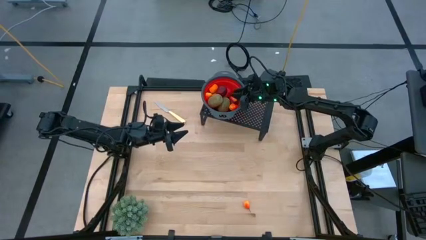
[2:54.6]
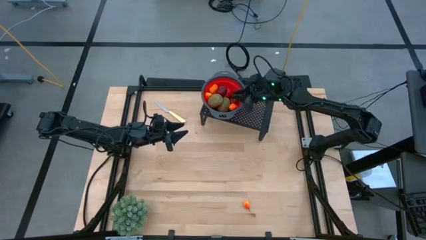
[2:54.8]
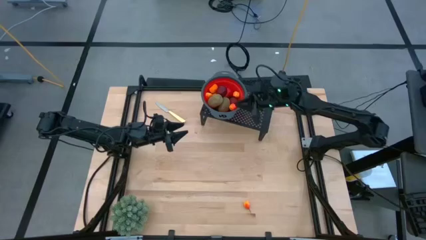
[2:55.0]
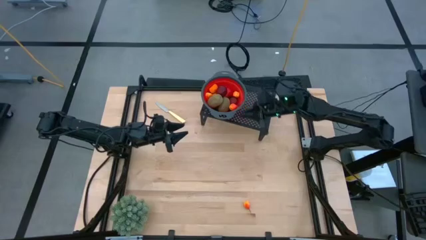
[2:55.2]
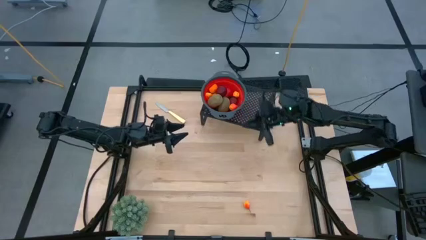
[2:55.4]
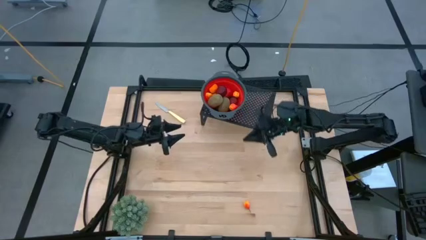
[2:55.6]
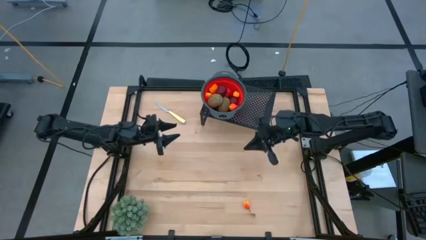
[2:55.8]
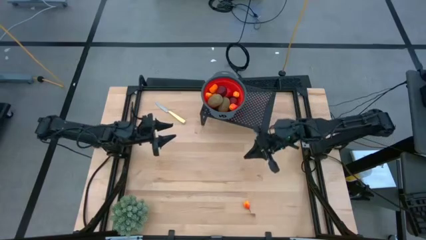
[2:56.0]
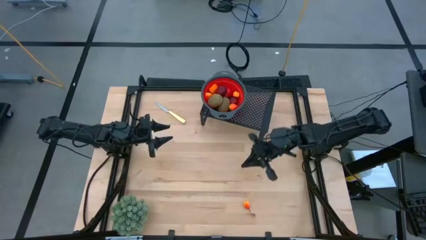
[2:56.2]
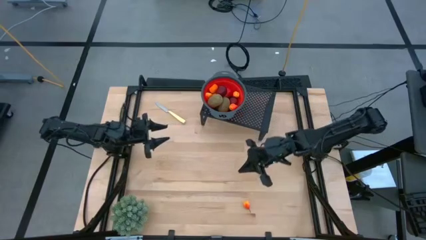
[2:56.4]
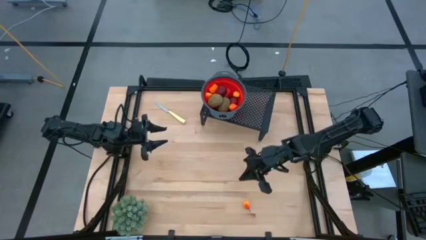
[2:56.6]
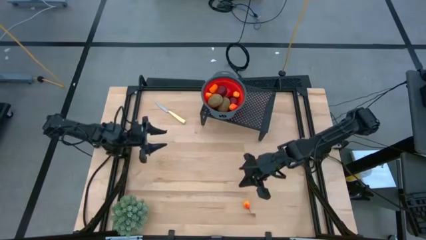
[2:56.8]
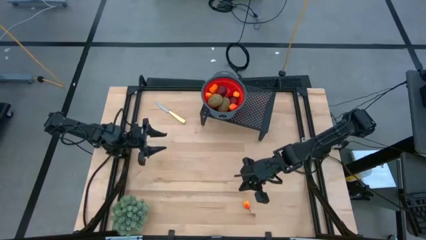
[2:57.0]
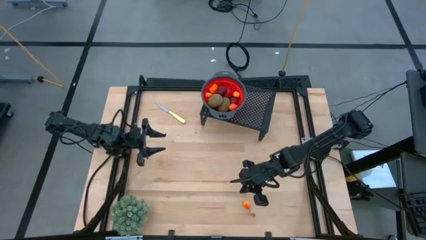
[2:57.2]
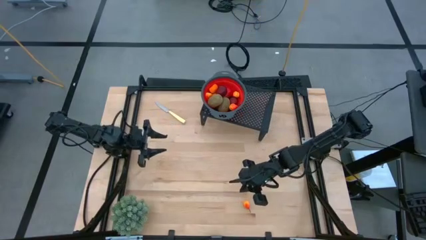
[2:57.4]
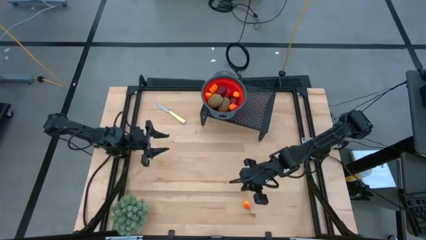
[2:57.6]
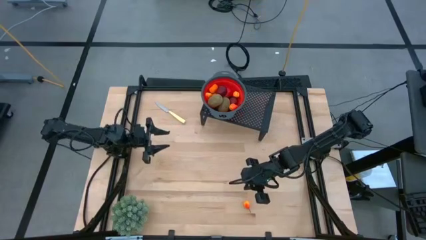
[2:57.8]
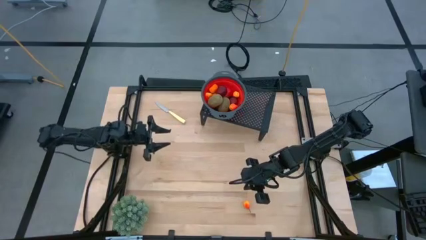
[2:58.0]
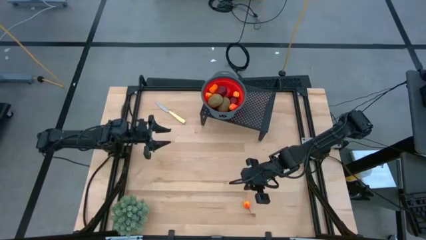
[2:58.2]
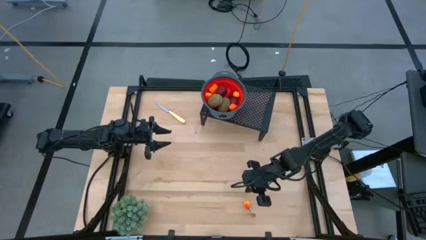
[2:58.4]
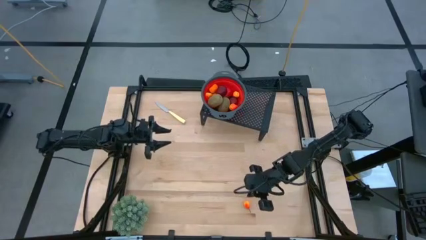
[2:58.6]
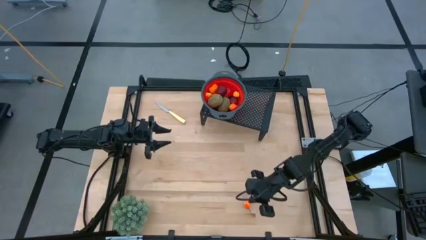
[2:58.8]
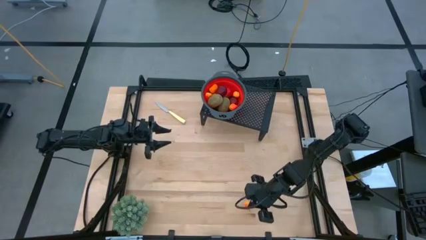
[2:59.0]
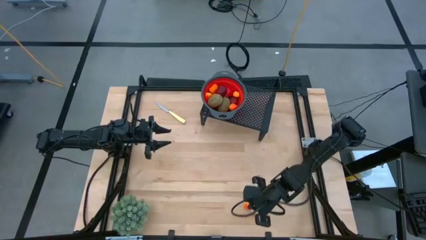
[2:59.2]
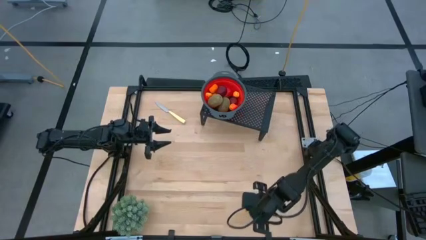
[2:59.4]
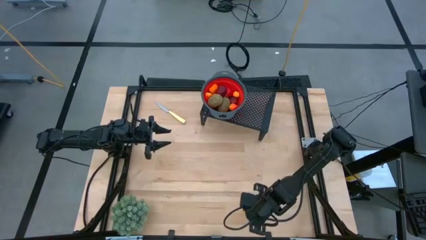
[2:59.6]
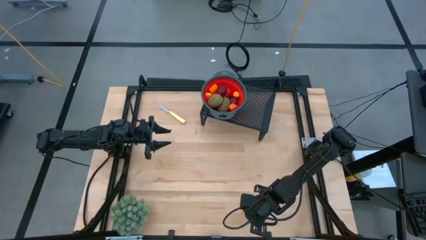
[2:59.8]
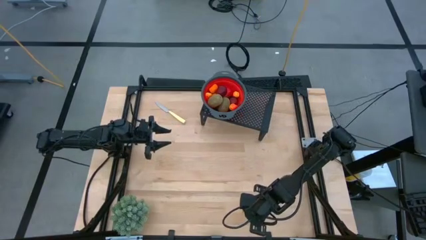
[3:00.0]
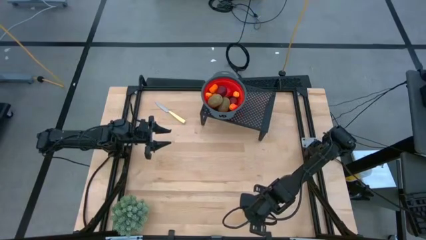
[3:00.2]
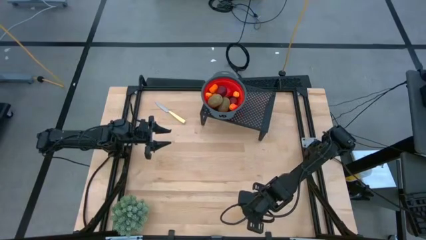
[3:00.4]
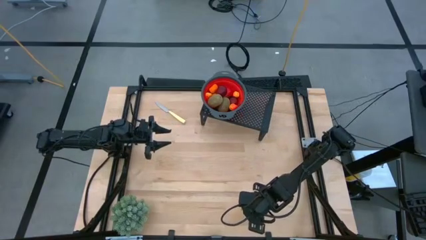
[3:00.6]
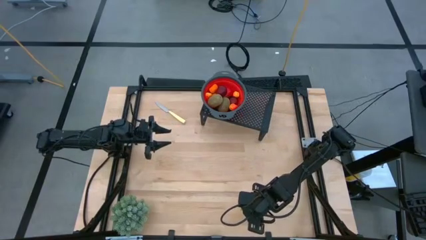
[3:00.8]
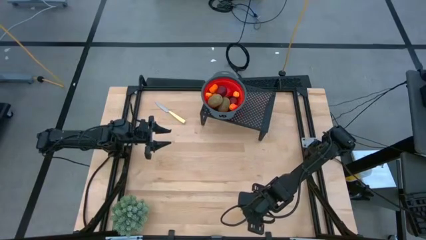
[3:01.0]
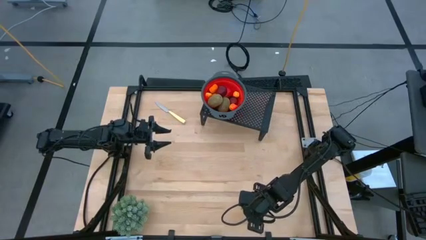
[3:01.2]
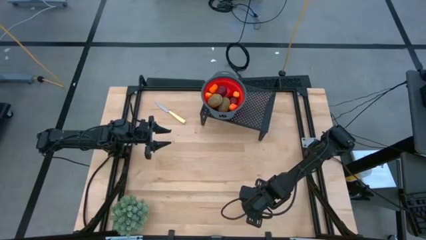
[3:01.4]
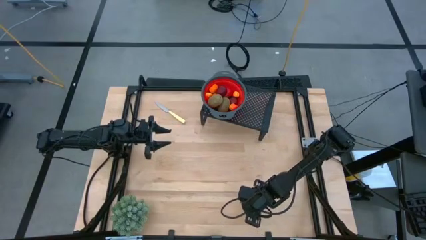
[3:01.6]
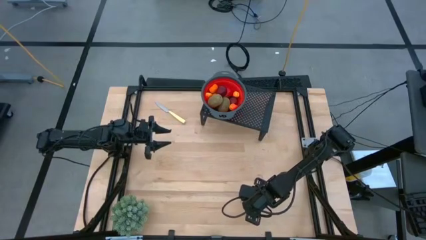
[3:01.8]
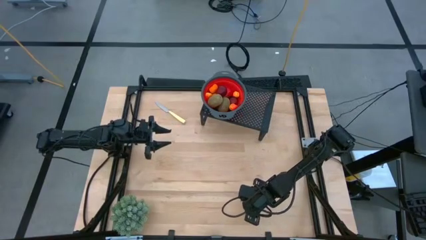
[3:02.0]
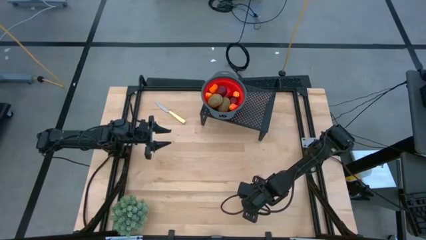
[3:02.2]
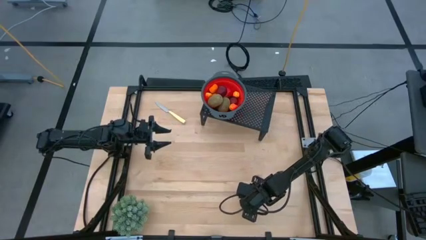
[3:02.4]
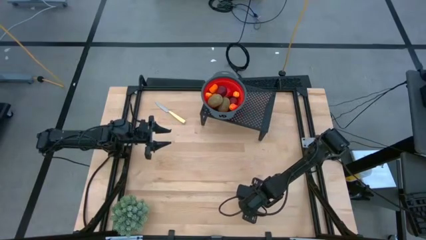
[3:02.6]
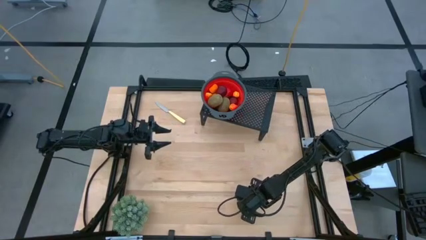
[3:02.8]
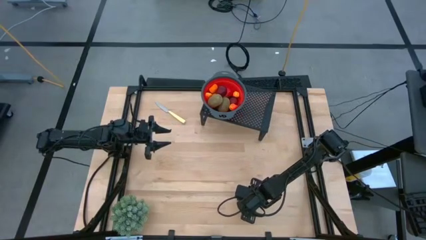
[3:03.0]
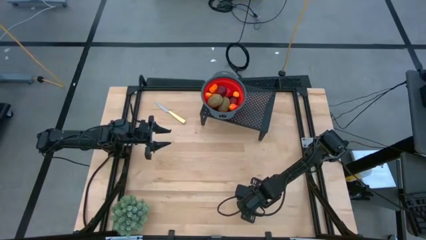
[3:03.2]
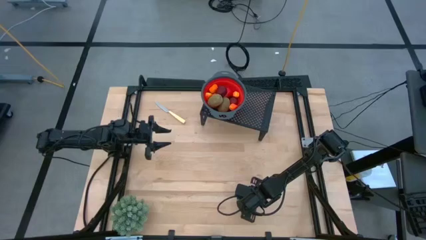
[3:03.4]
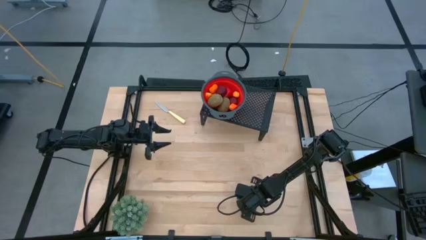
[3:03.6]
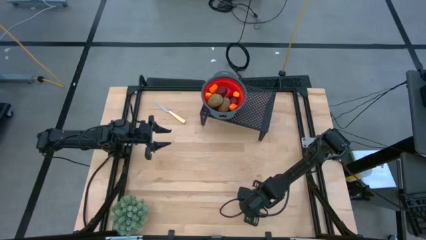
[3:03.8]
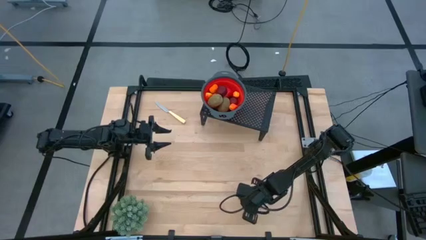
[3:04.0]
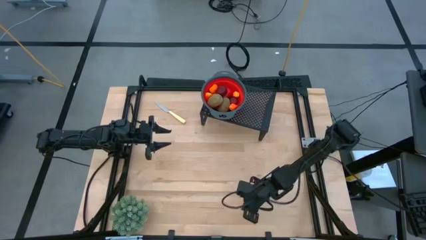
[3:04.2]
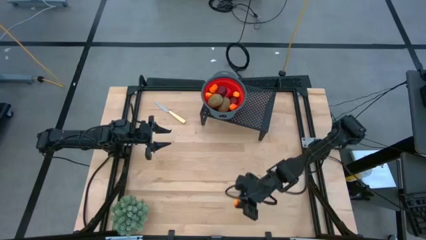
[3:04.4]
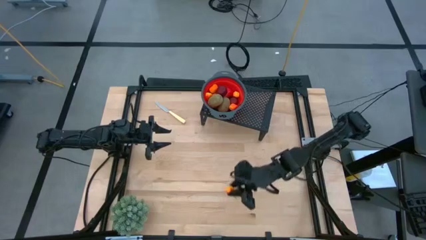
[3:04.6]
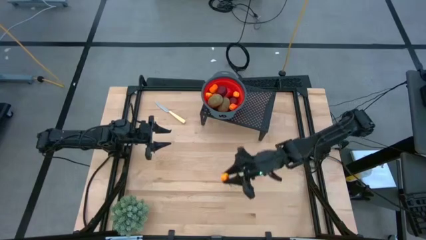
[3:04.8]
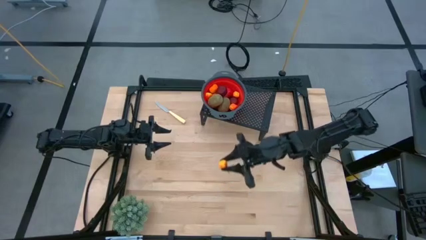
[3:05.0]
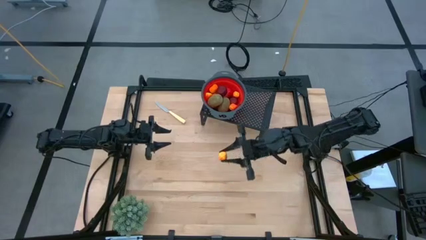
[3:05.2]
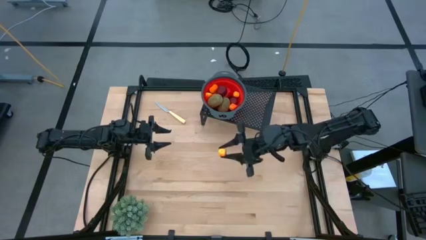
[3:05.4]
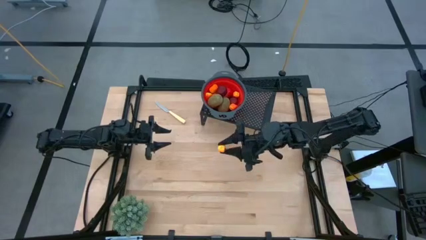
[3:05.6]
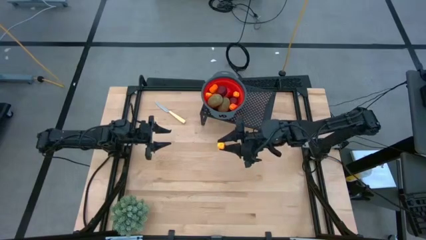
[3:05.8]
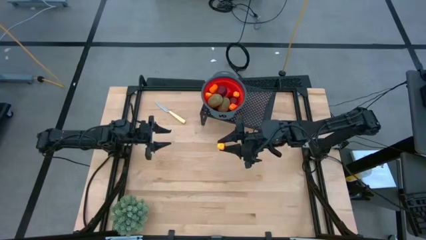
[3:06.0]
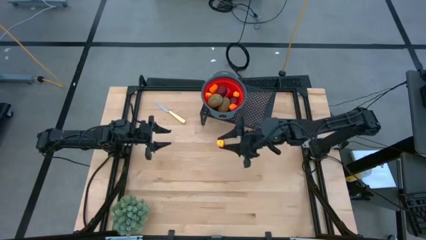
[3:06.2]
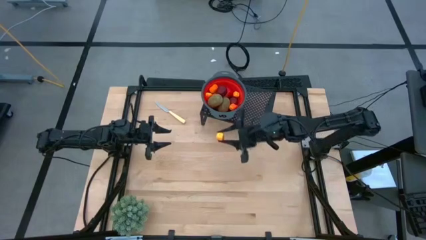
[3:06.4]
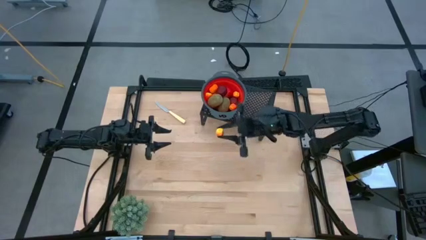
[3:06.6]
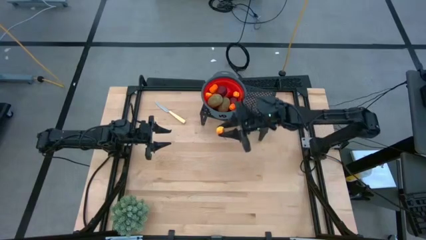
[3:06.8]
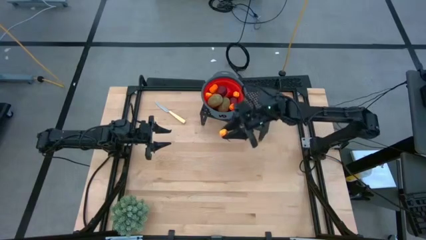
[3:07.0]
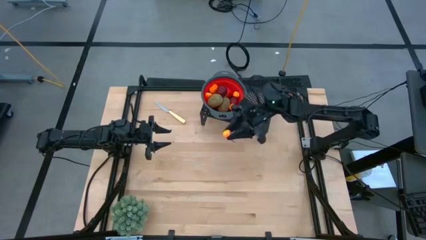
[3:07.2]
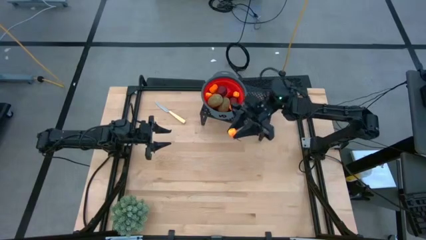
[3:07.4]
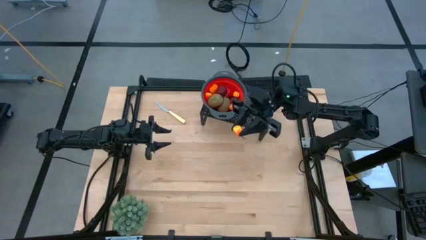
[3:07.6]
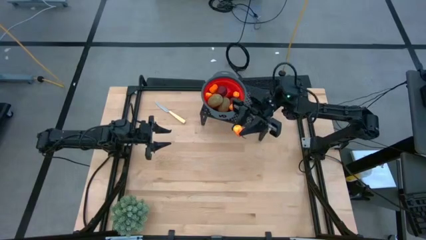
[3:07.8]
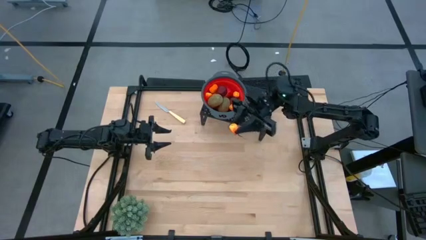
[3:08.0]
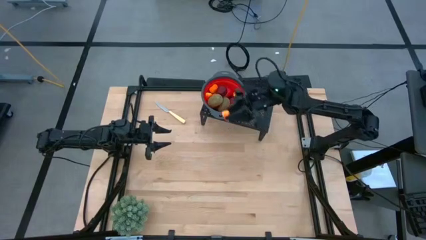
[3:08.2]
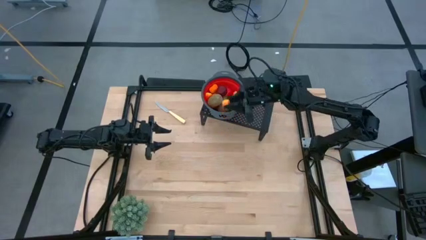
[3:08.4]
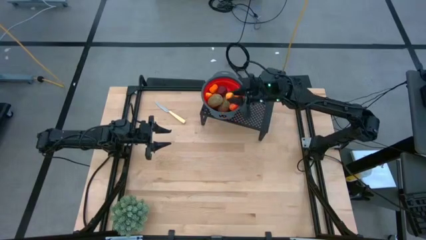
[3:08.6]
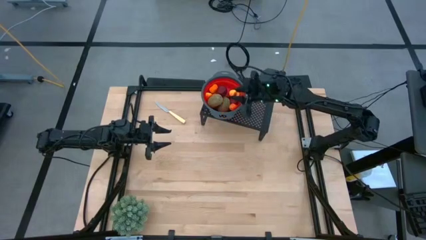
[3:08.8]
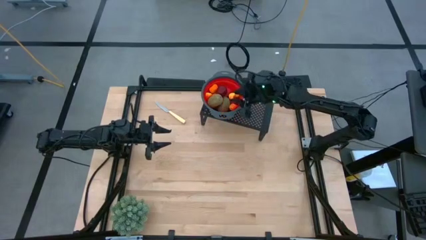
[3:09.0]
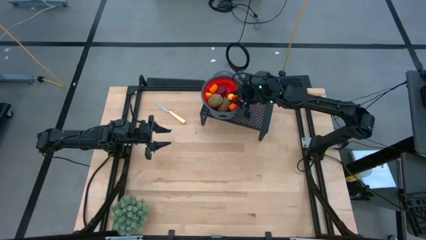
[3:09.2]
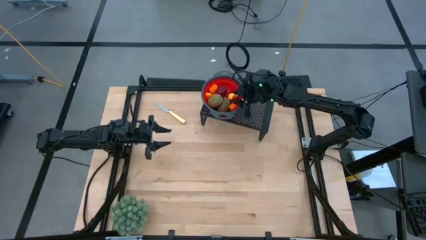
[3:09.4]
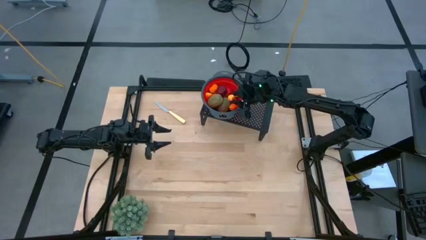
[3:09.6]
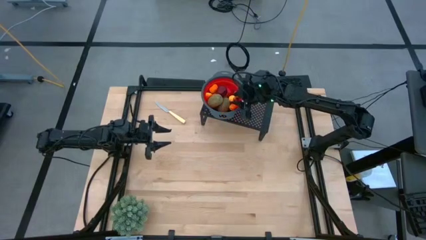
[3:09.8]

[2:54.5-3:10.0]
Task: Pick & Place Fruit
Put the pear into the strainer bowl on the shelf
